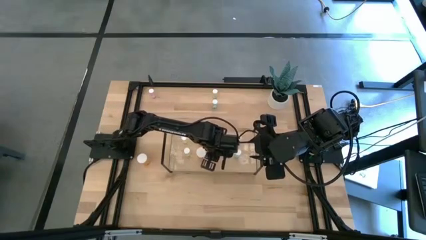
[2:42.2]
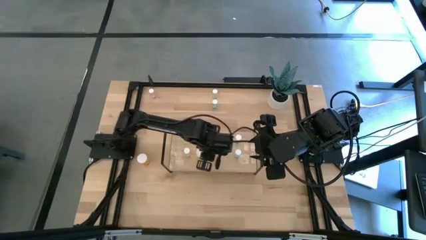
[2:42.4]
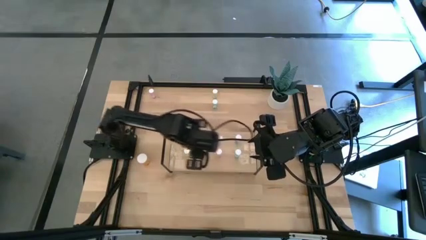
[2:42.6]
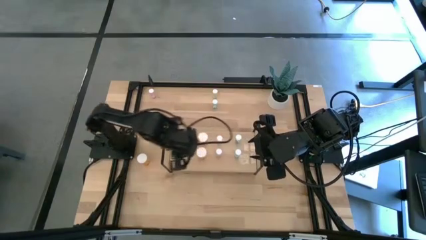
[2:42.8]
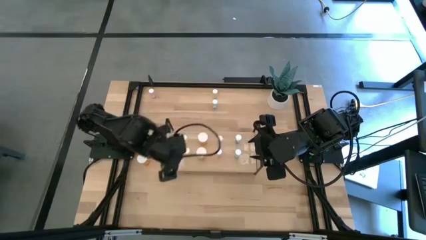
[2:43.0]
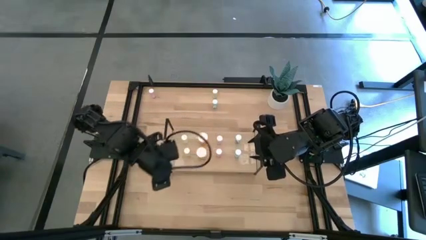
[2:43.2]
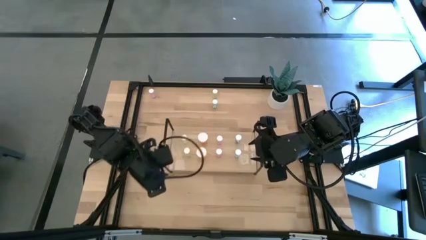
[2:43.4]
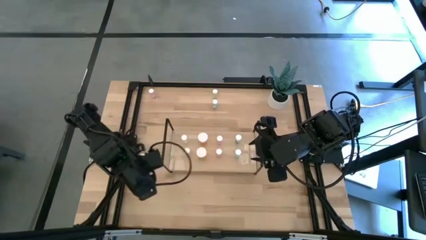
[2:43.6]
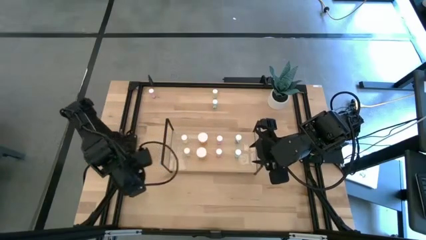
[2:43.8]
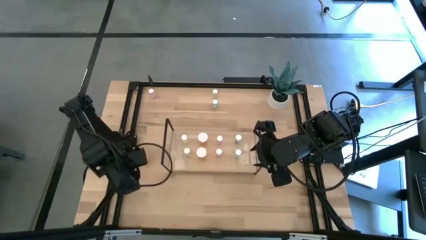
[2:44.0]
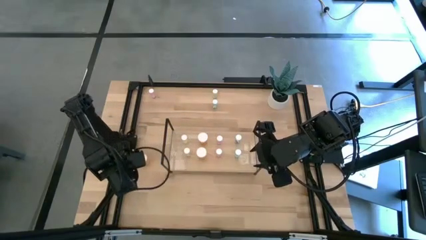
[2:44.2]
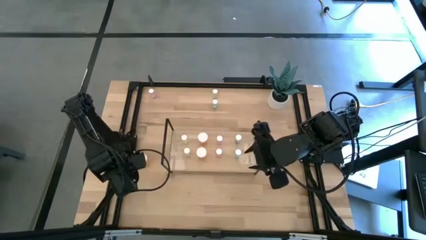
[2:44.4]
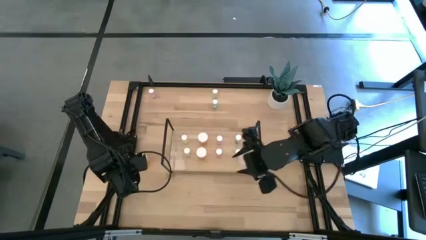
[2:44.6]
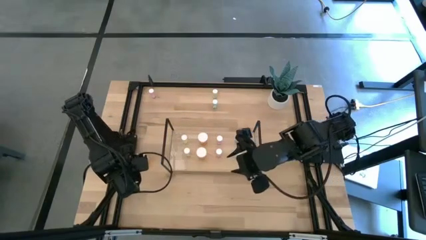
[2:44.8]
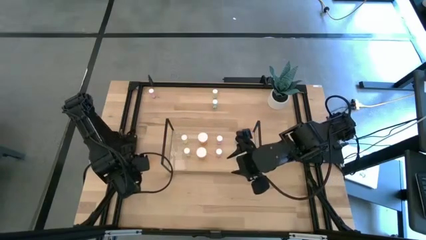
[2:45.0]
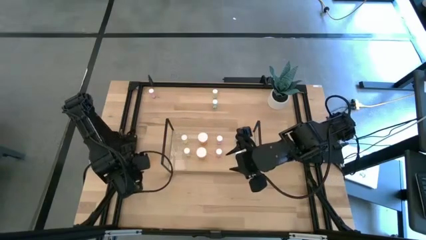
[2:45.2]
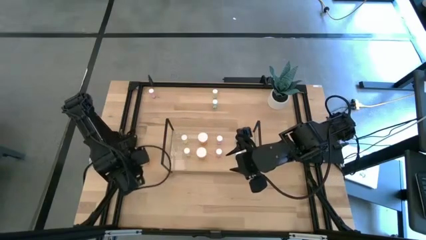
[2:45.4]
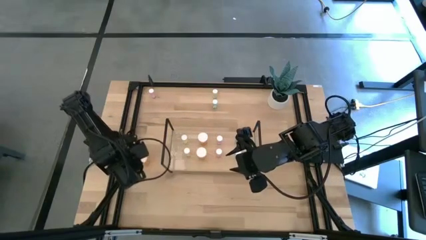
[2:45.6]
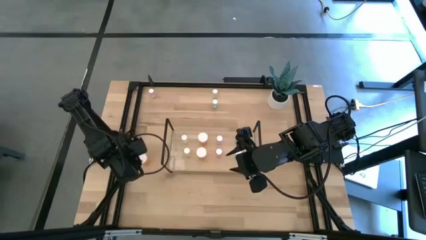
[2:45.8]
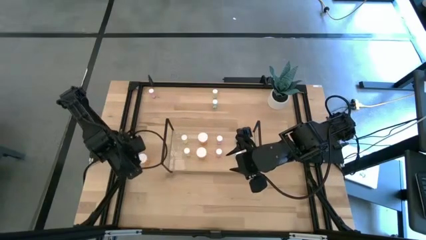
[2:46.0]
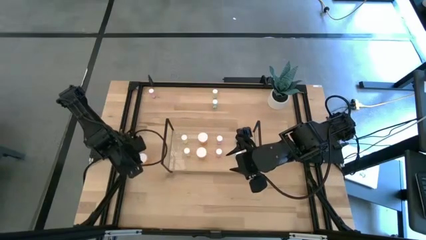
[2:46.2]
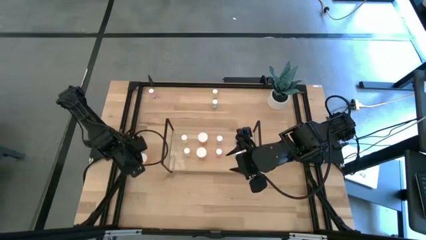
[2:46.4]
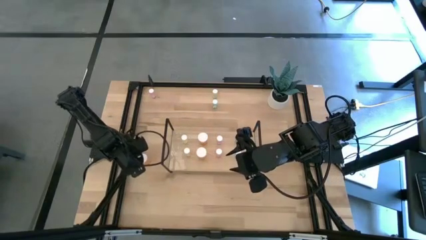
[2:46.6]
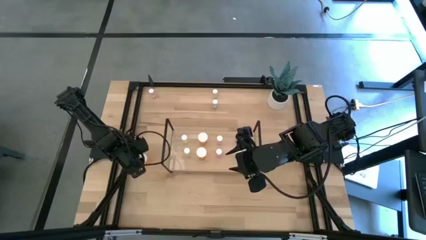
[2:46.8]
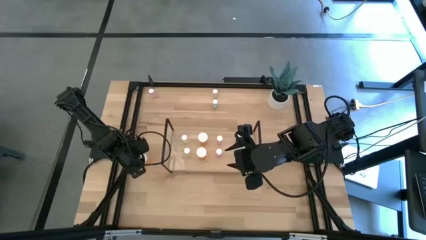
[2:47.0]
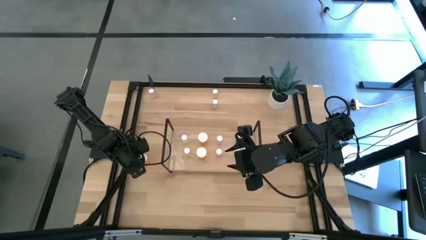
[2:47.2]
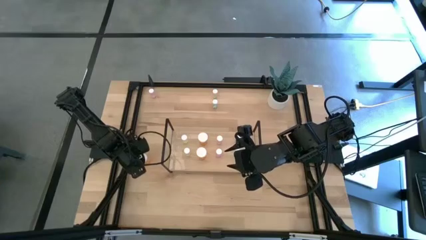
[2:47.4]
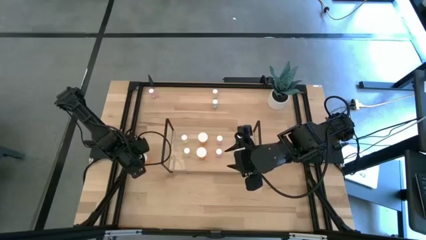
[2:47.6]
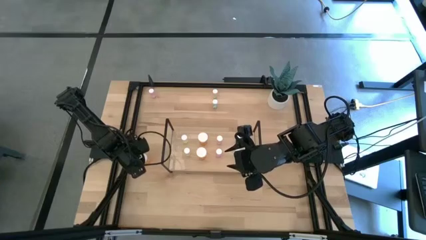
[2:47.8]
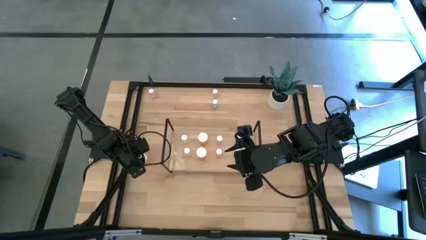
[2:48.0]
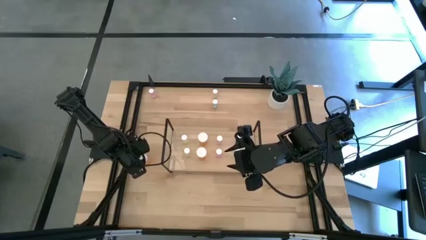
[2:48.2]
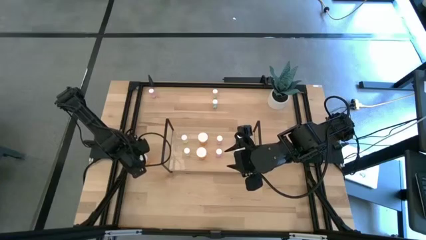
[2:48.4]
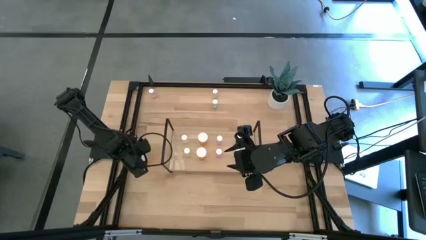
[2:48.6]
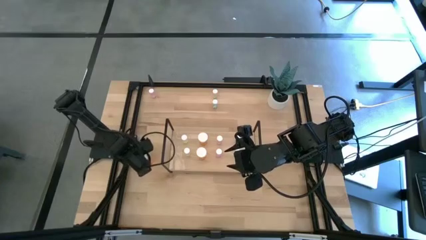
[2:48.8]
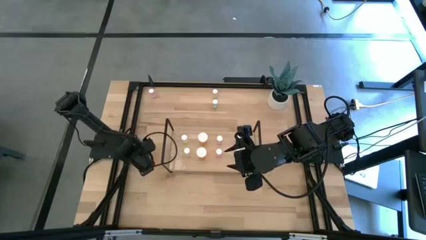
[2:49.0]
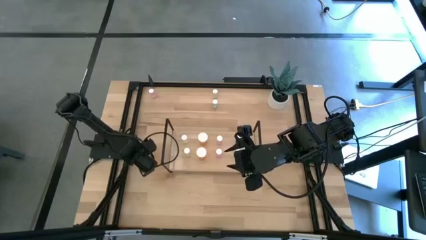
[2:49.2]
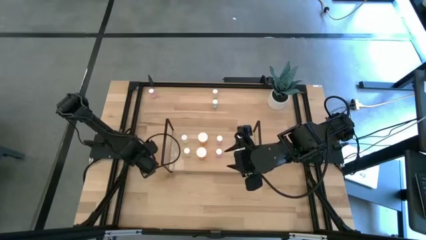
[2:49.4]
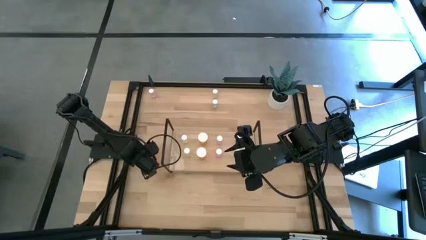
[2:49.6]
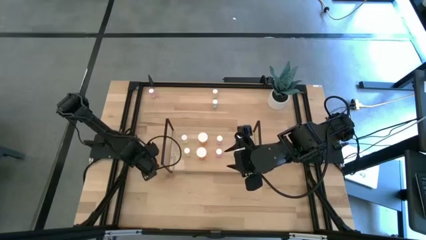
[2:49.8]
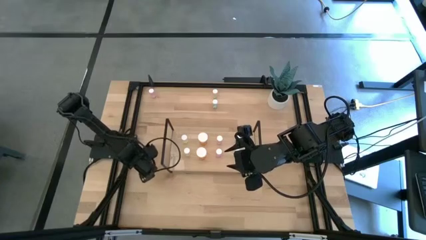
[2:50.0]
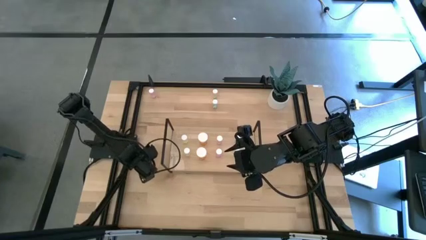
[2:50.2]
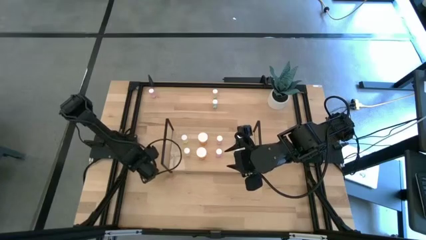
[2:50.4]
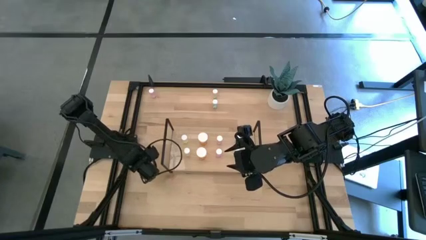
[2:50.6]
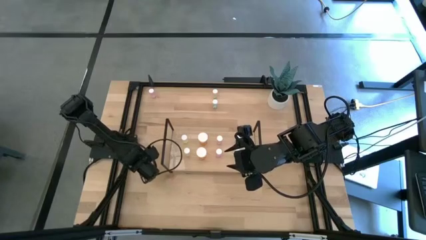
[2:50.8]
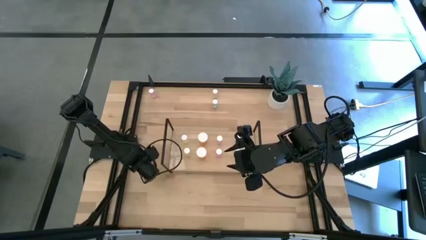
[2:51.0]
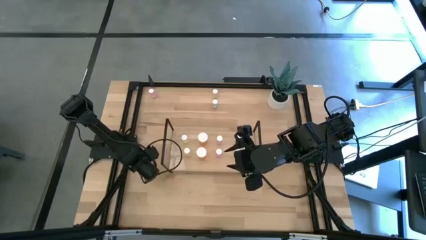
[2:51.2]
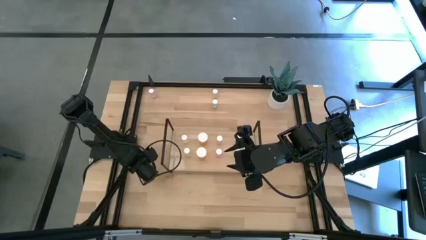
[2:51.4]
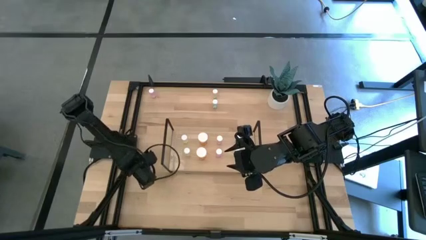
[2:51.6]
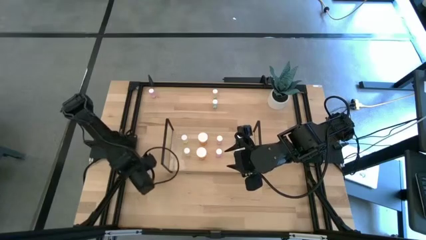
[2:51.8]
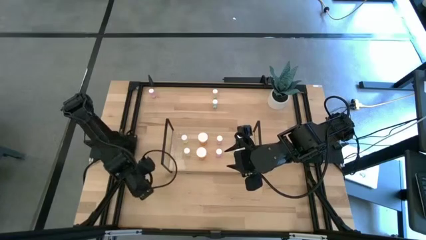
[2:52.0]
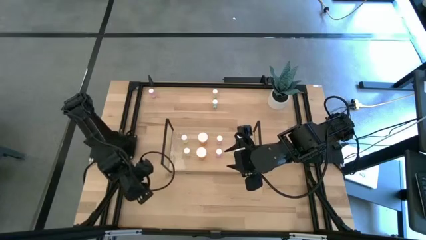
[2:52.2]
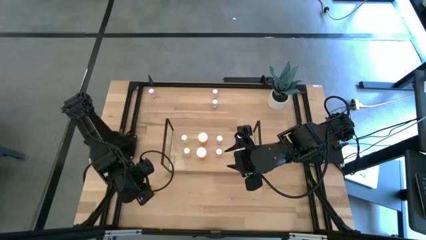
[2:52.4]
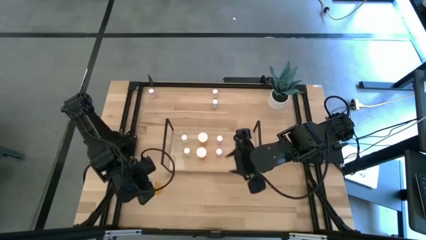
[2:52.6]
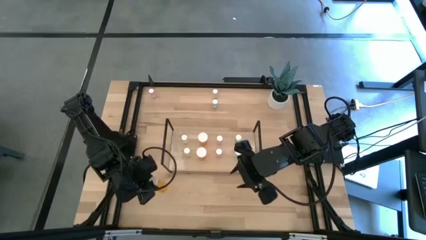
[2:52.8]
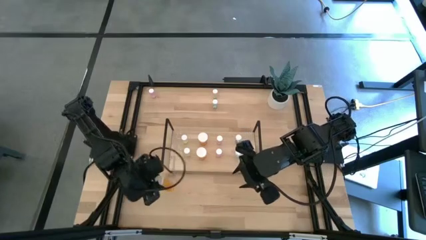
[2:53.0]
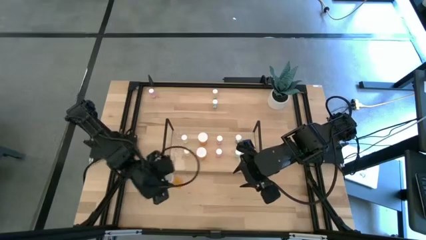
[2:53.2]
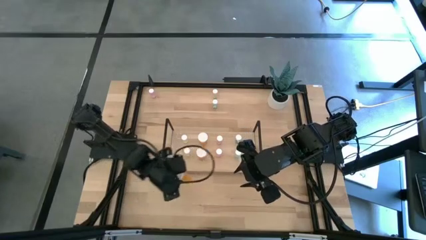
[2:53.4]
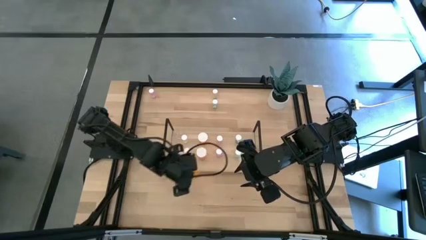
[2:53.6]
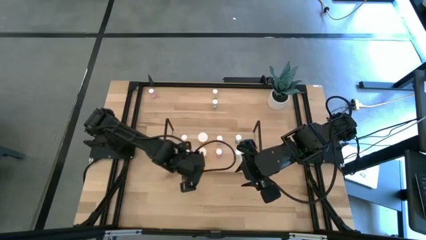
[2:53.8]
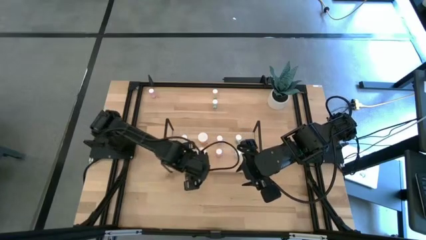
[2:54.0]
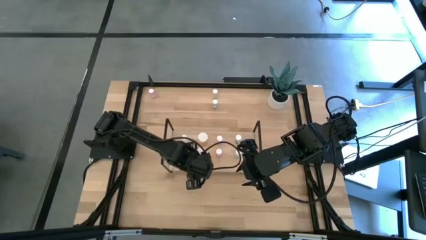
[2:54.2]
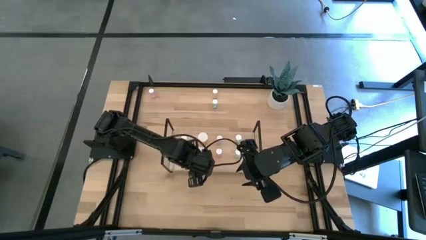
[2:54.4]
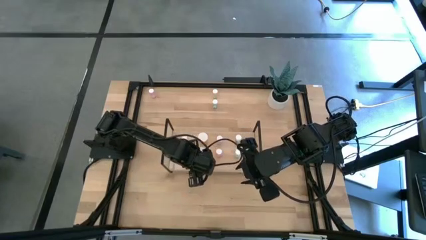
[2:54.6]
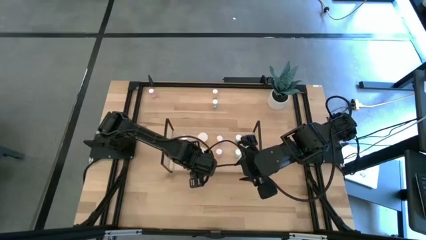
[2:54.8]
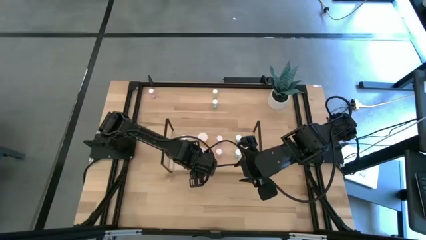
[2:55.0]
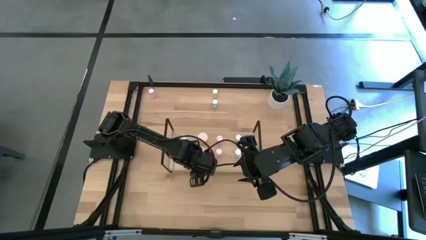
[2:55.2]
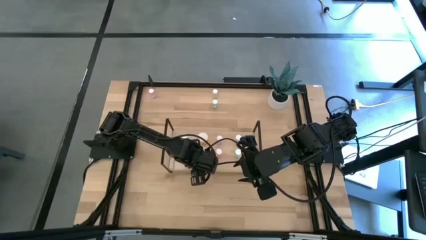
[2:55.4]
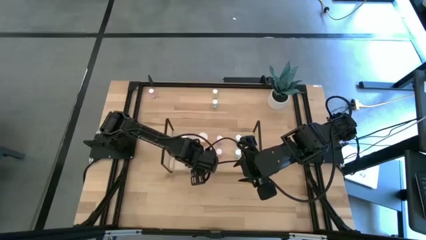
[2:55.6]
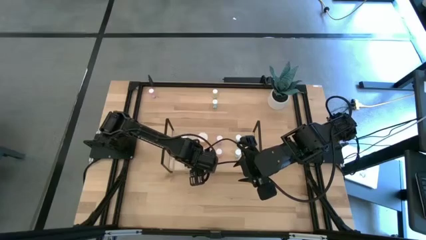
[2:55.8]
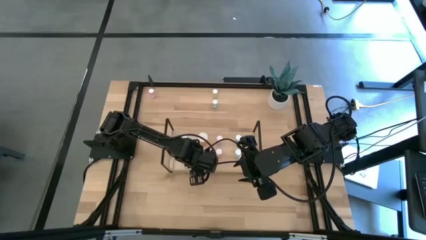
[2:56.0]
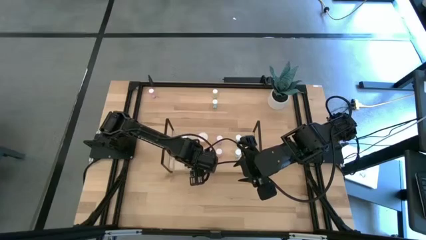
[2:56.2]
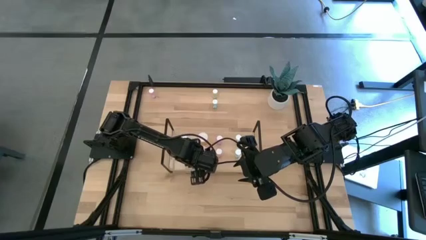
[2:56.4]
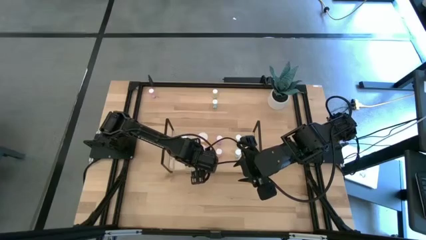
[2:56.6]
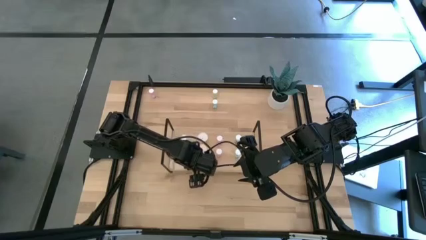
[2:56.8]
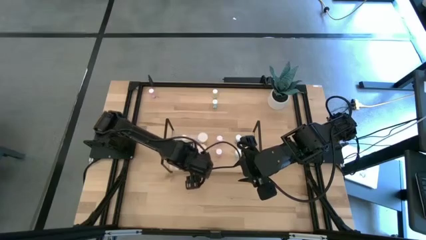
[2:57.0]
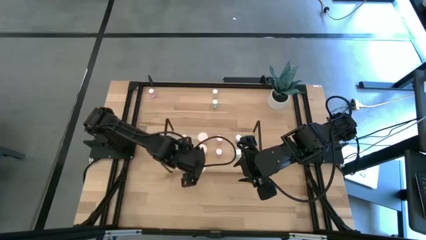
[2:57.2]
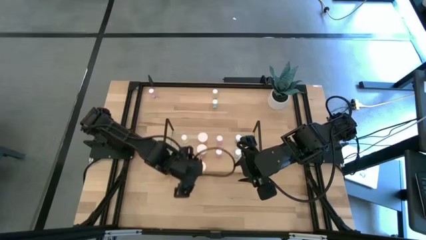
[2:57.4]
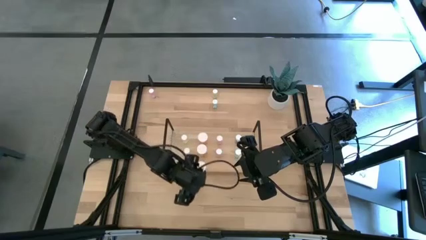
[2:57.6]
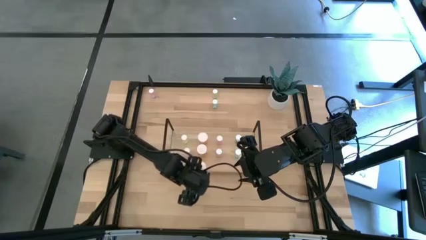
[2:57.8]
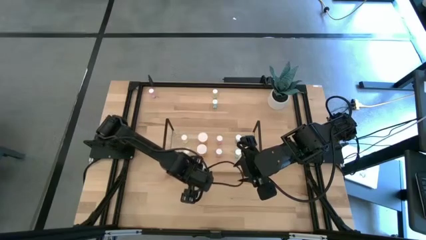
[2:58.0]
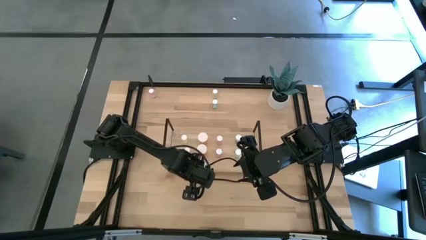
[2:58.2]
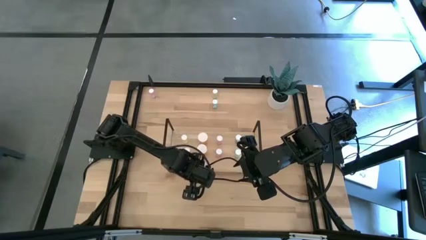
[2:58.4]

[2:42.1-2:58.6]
Task: Pick and place medicine bottles onto shelf by color
Put the orange pill bottle aligned with the orange pill bottle on the shelf

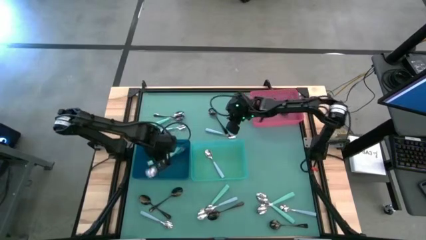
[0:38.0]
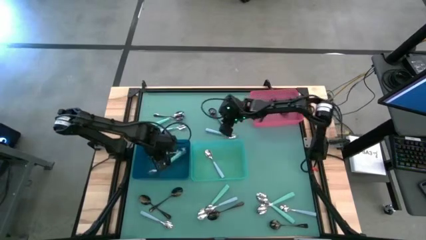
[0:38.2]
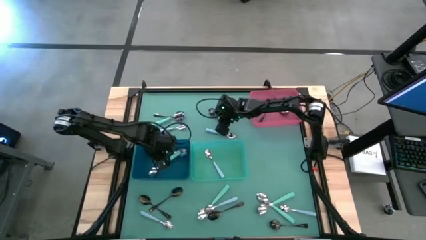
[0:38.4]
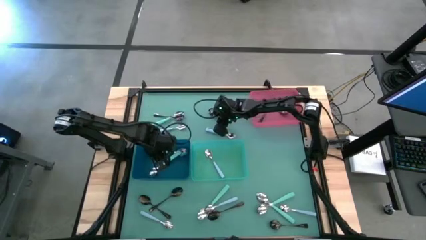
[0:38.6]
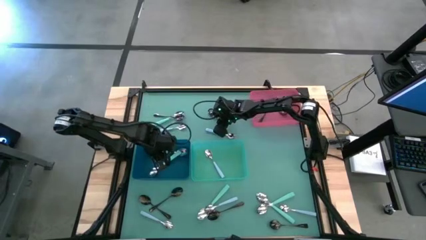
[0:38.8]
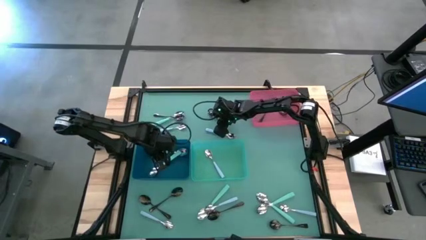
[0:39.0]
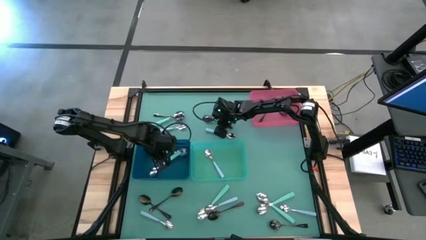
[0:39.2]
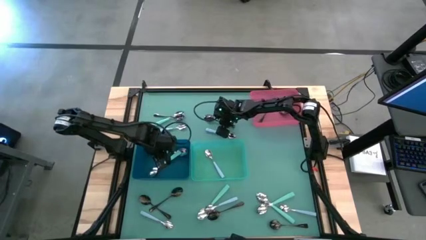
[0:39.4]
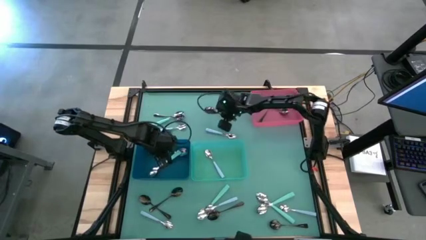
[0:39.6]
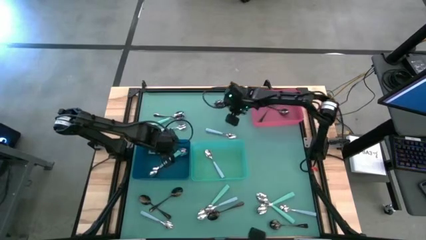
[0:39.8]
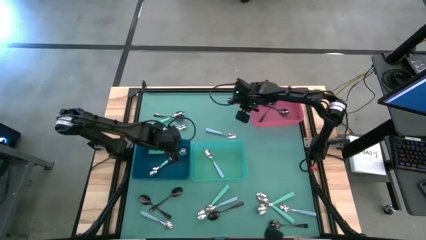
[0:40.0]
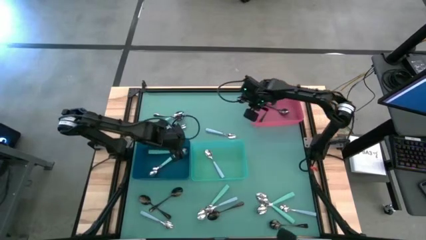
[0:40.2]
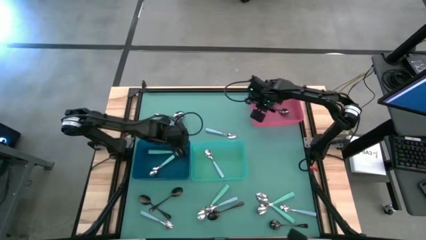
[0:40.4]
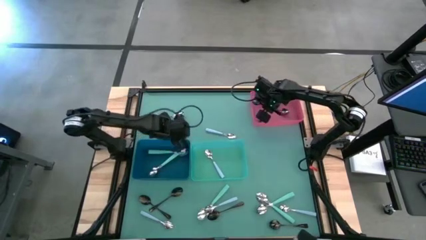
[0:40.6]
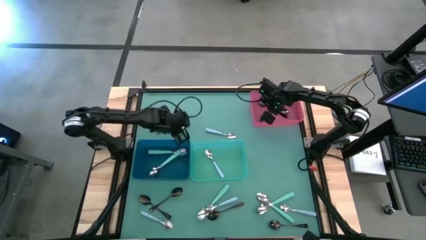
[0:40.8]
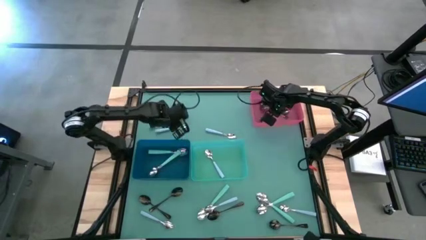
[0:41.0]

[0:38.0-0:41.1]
Task: Sort silverware by color (type)
Put the black spoon into the pink bin
